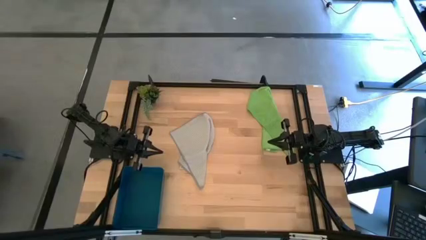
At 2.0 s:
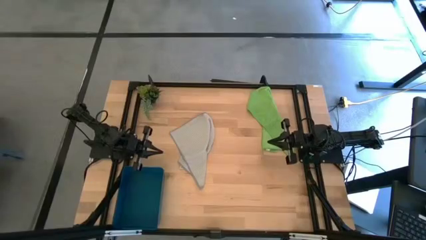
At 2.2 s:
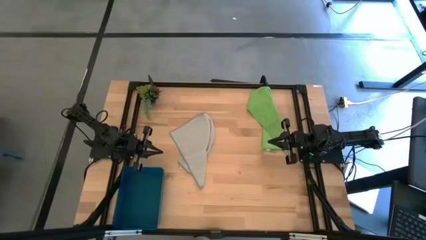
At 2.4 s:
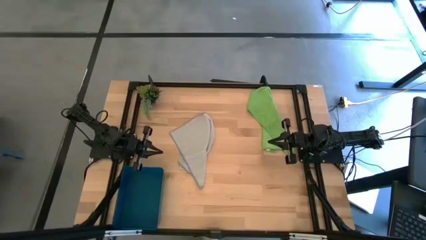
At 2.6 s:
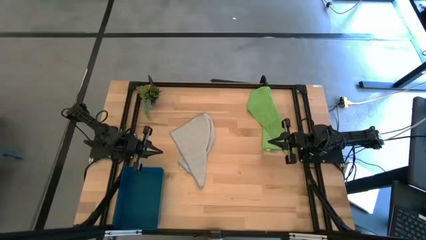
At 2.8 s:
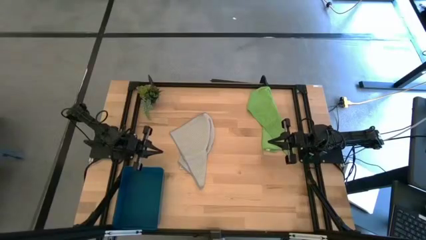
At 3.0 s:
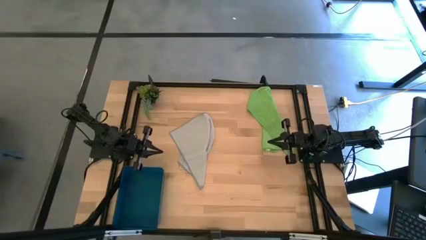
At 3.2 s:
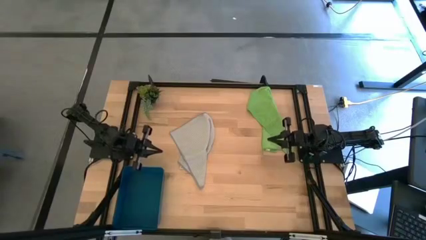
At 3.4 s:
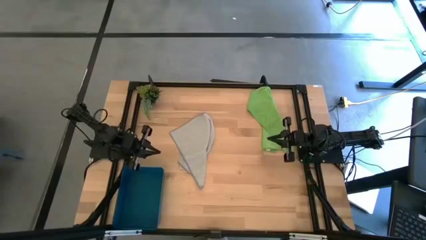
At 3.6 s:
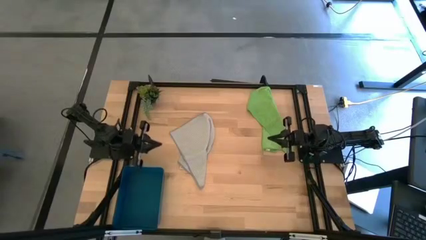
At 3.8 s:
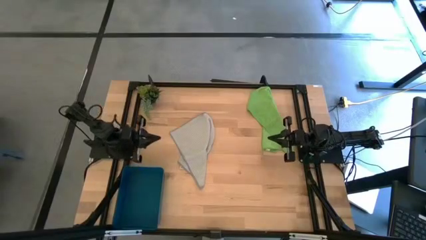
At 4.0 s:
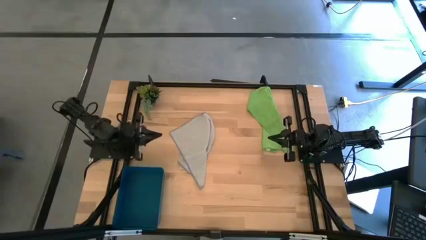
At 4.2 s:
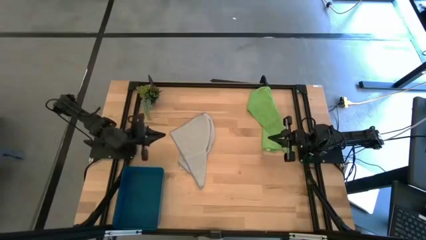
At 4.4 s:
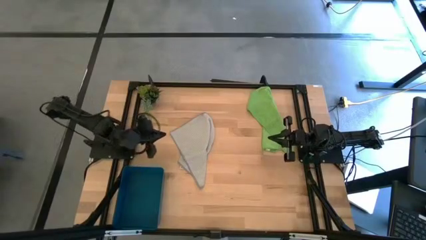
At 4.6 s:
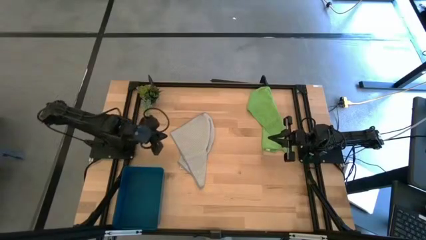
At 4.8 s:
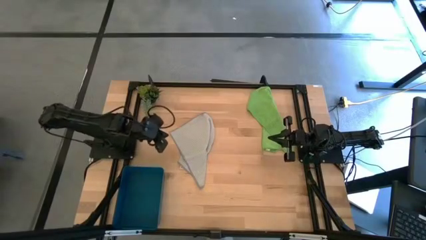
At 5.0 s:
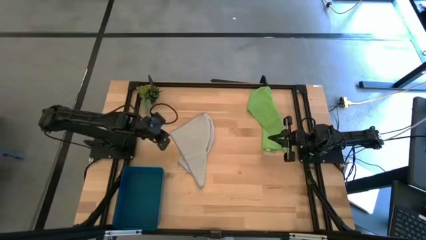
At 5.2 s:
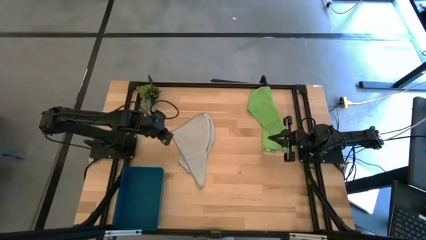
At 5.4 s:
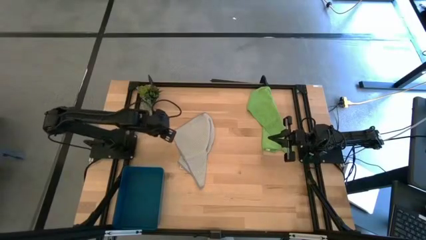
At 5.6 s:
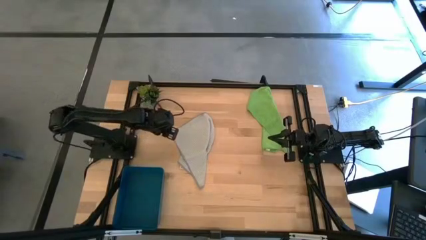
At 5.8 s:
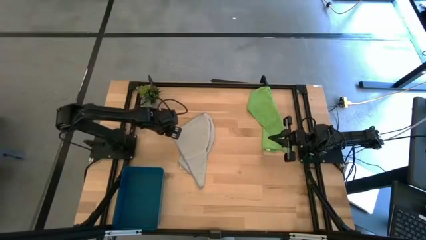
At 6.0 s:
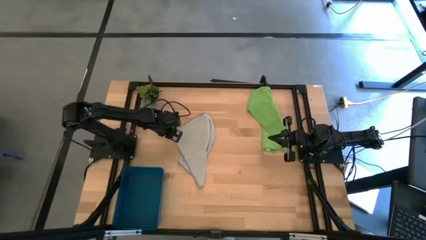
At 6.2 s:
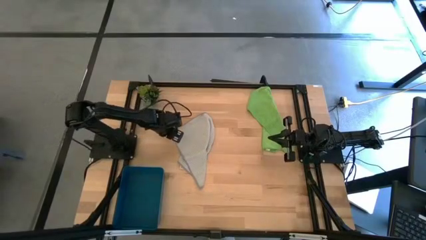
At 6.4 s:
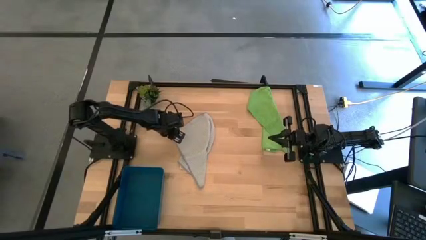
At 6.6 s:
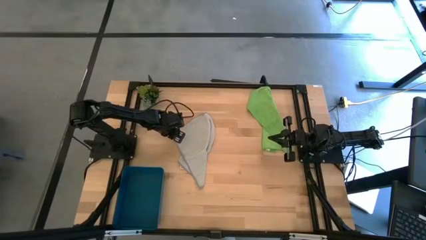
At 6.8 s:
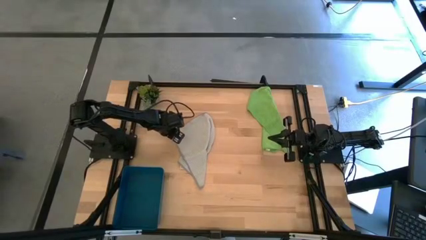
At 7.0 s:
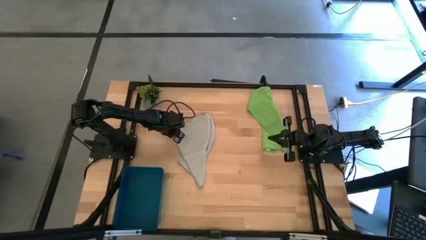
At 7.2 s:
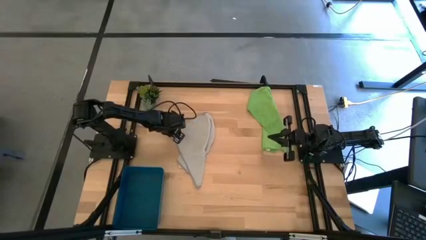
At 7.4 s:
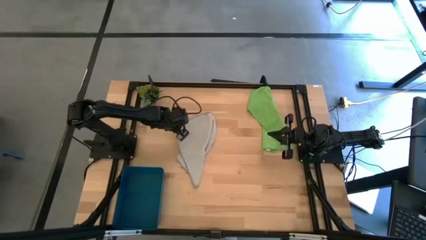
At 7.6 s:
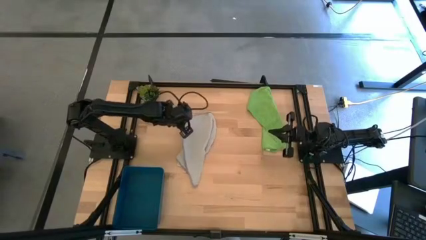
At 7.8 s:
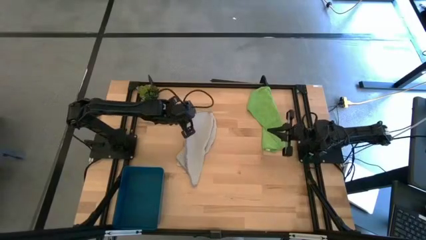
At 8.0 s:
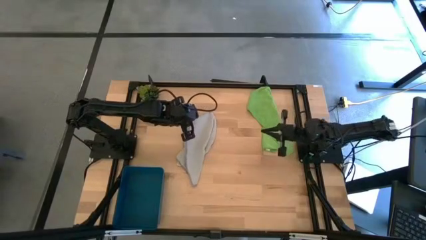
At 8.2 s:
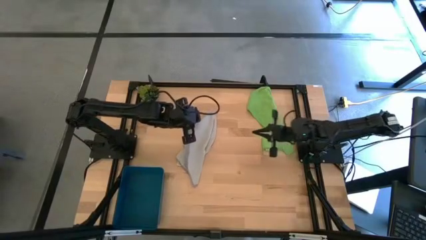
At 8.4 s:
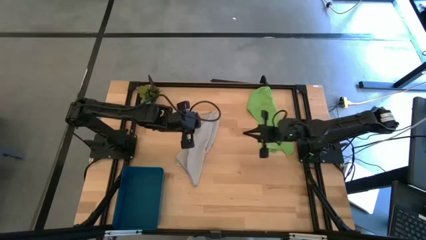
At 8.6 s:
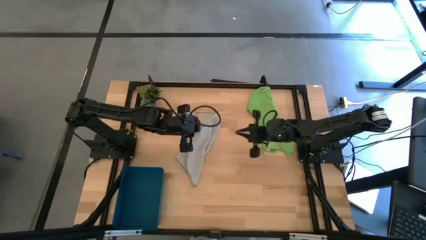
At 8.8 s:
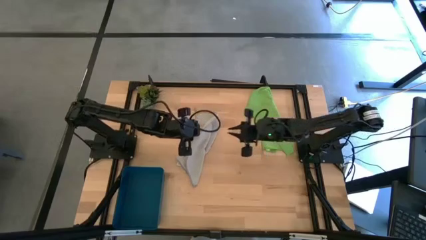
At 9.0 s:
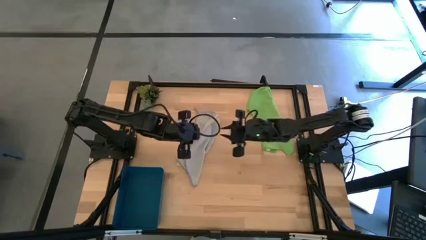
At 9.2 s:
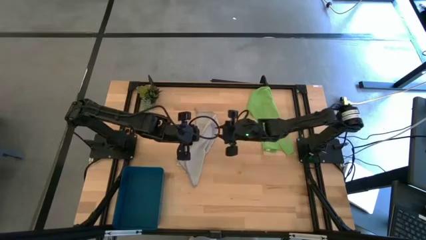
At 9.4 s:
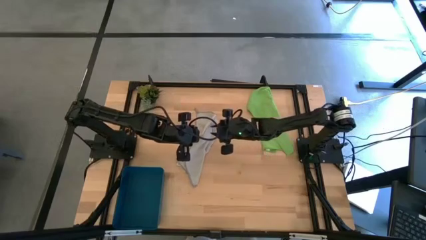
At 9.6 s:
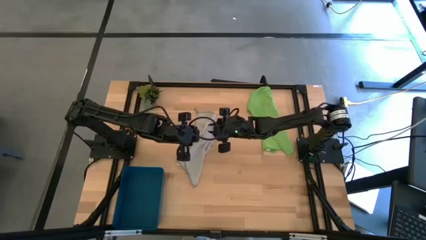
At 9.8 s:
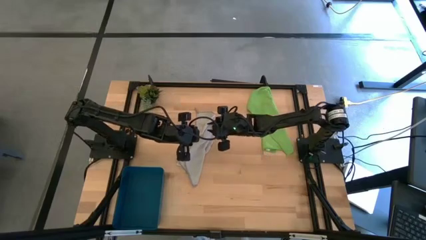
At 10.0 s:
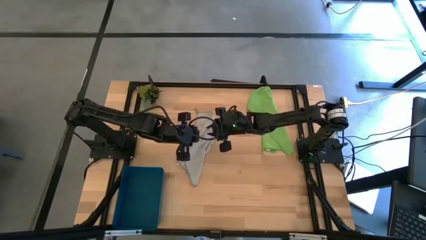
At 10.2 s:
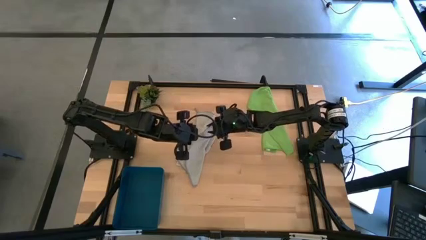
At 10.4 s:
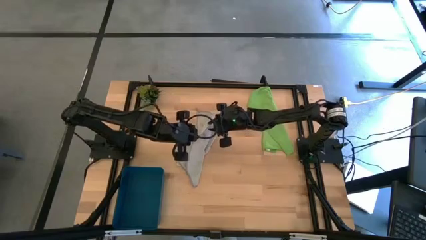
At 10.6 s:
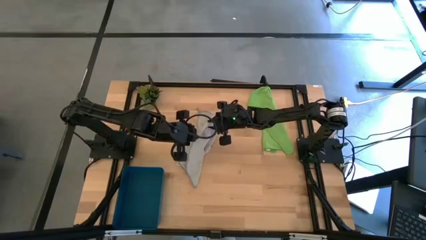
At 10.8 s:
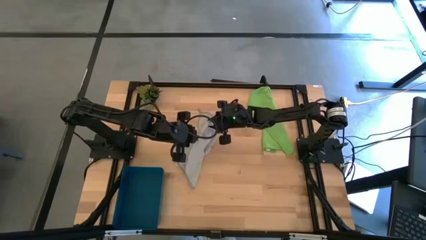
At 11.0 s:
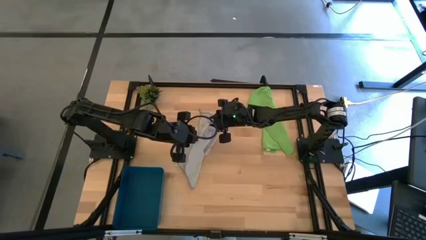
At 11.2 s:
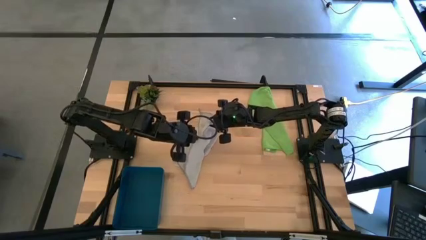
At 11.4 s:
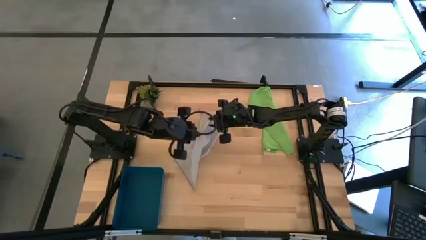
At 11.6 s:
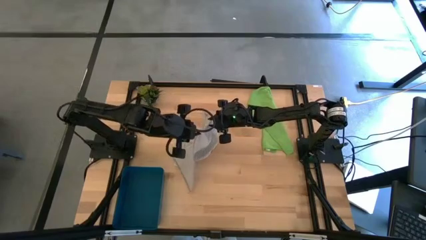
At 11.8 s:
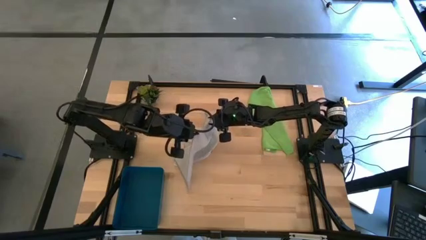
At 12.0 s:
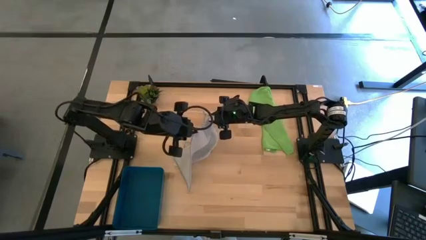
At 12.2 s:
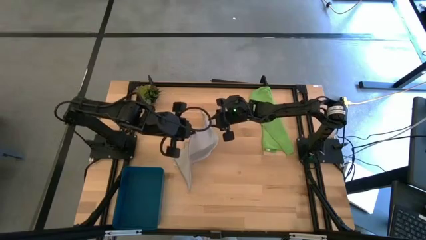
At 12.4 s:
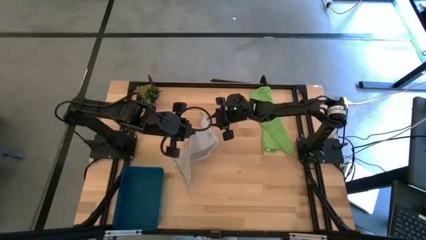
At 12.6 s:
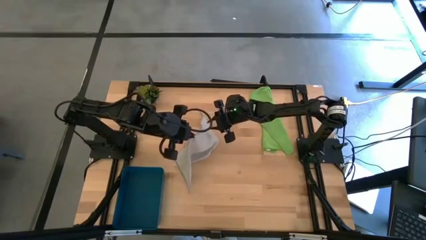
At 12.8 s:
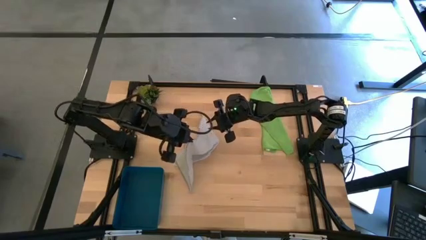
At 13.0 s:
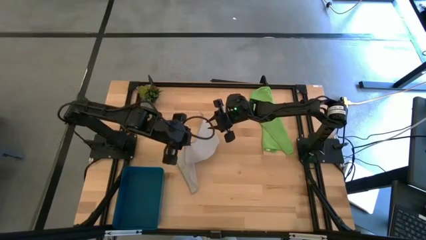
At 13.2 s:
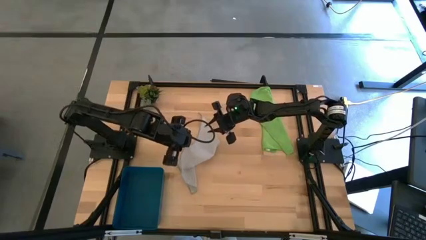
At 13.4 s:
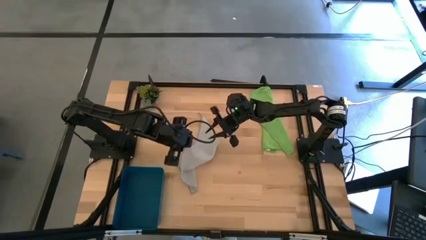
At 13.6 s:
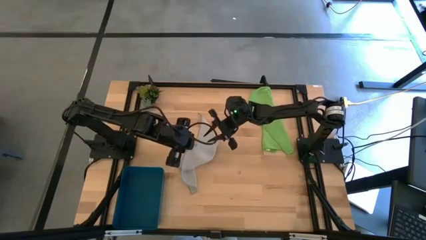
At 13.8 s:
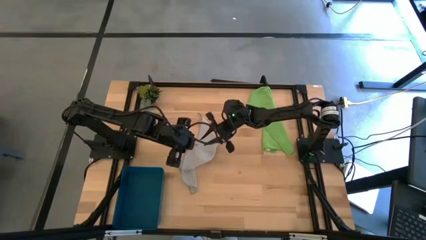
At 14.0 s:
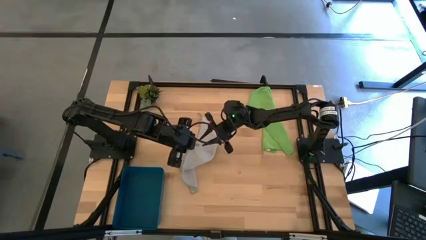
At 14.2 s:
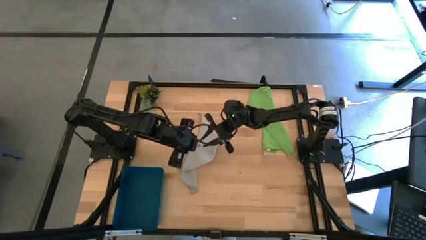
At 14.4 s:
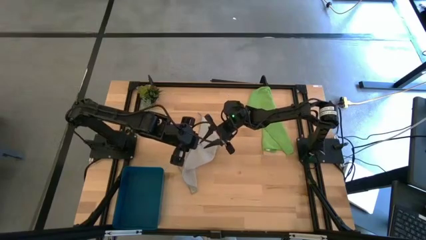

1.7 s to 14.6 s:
Task: Roll microfiber towels into tight, uniform cylinder then place into a basket
Roll the gray towel
